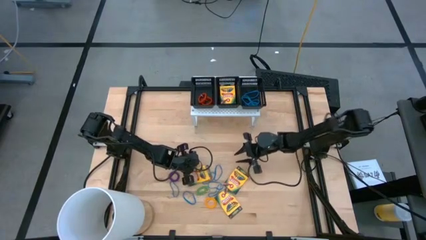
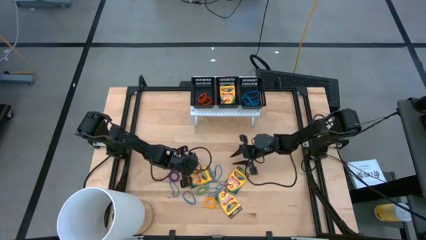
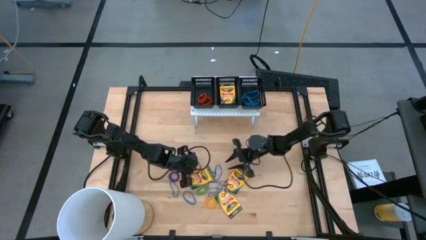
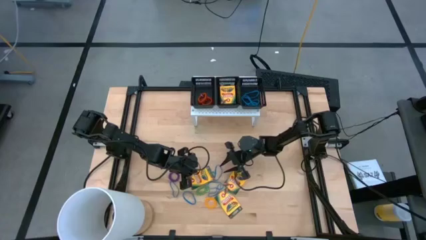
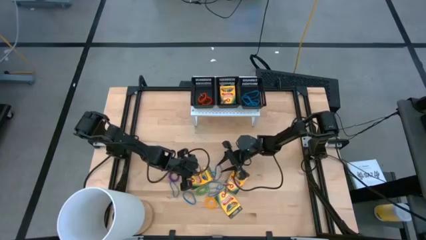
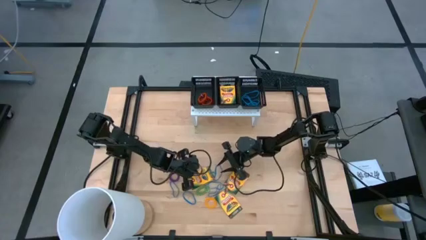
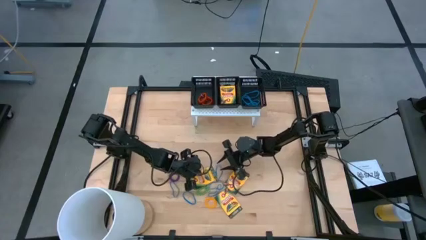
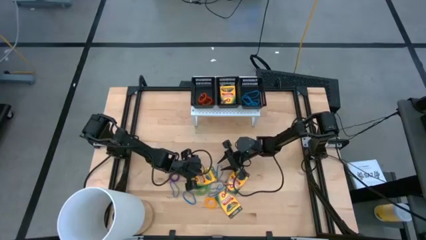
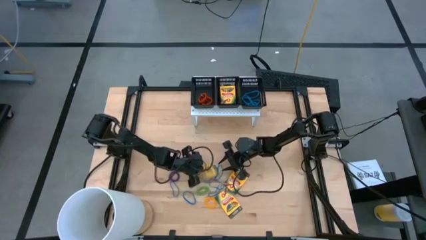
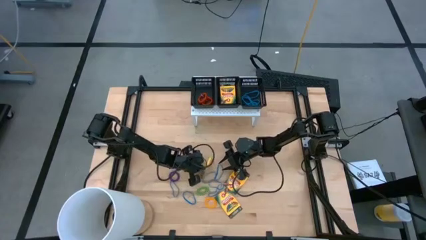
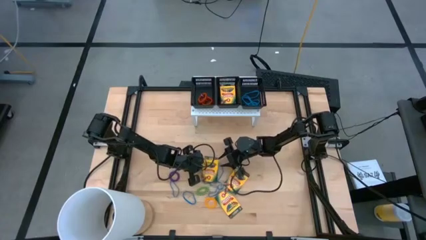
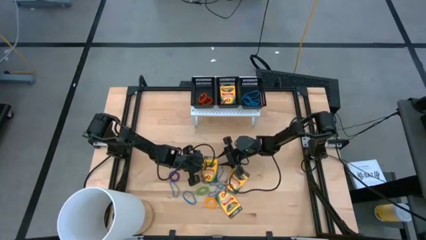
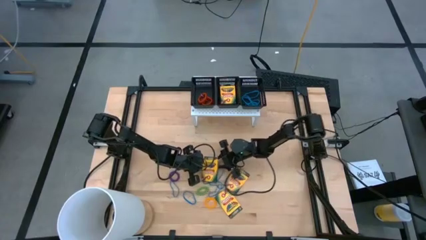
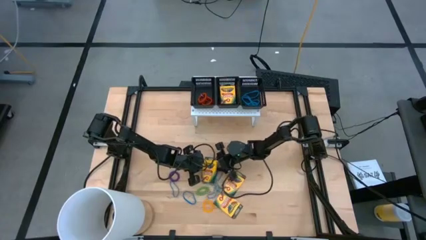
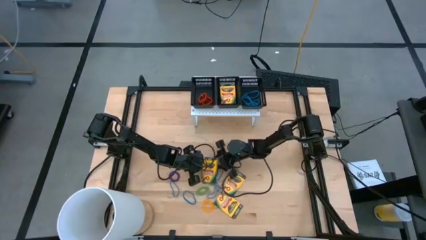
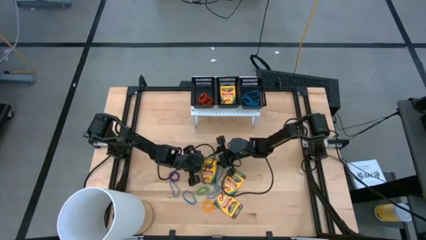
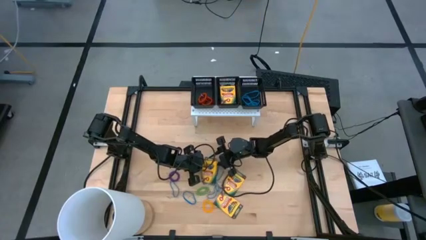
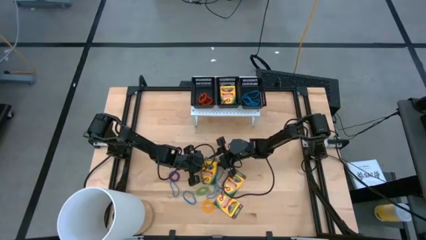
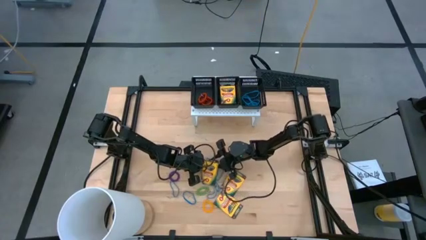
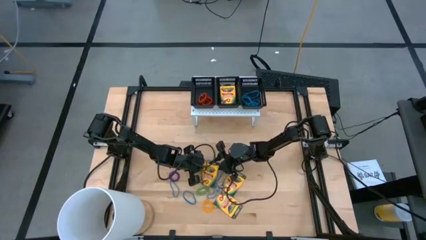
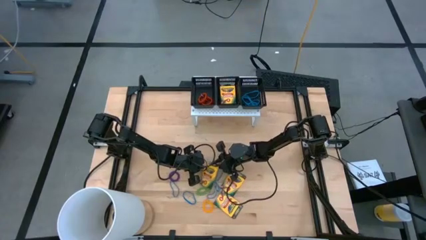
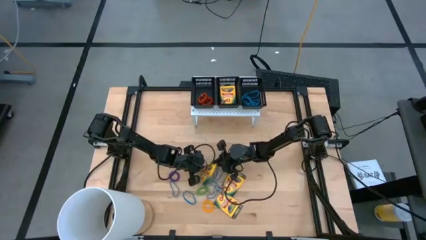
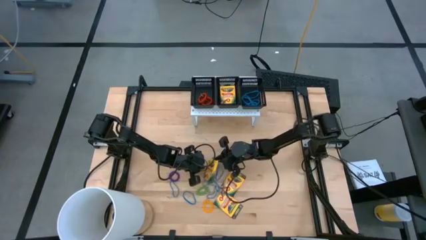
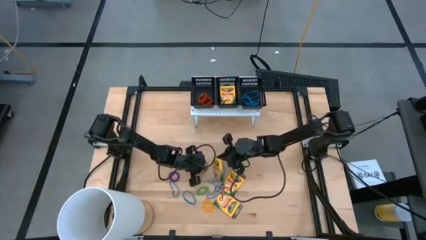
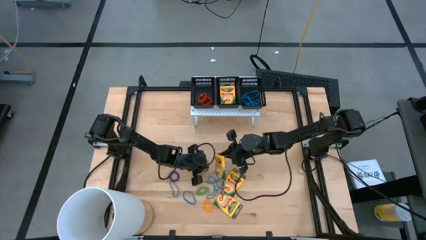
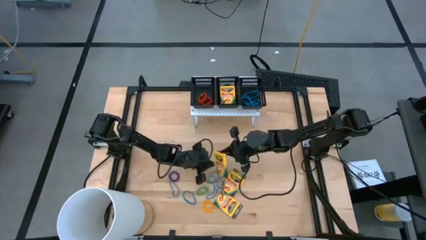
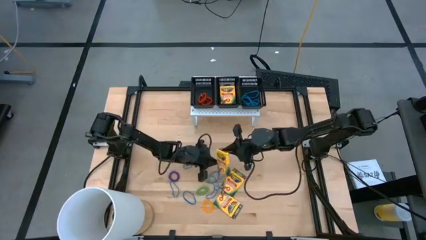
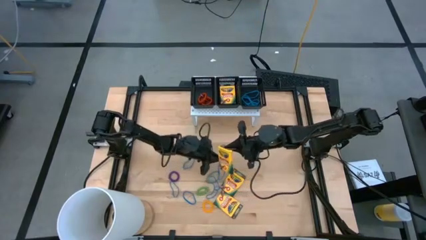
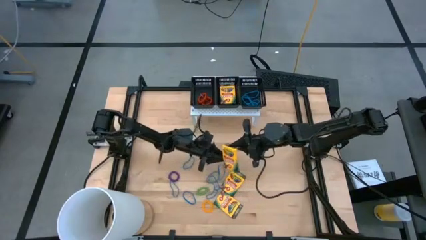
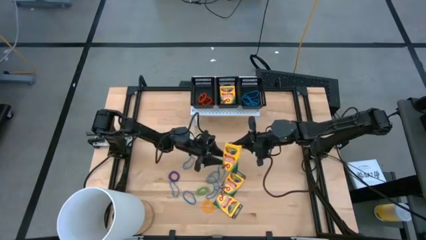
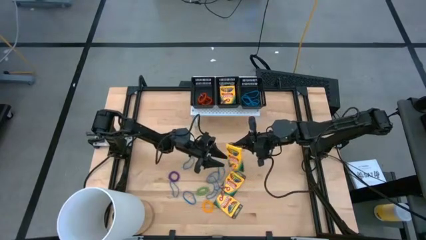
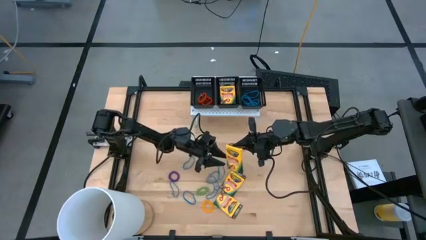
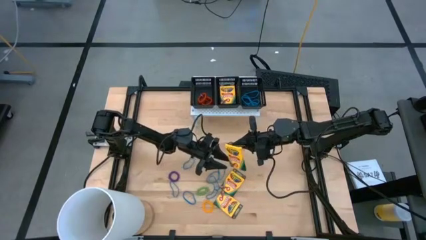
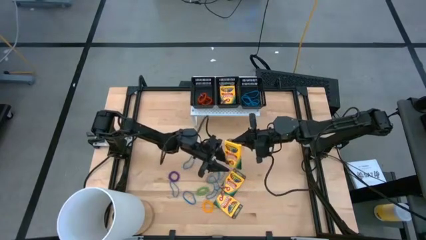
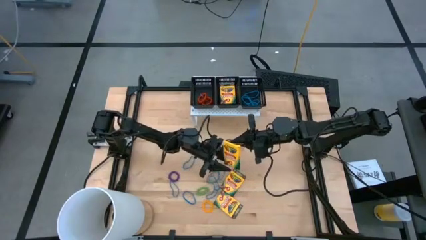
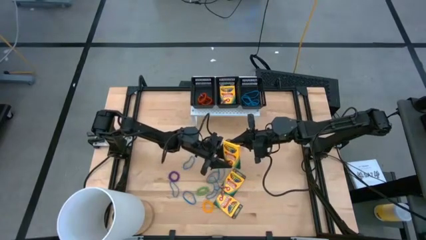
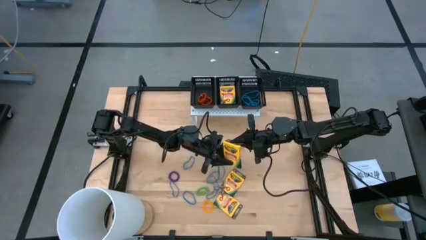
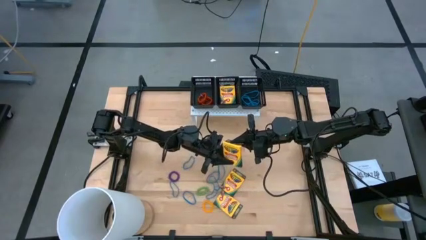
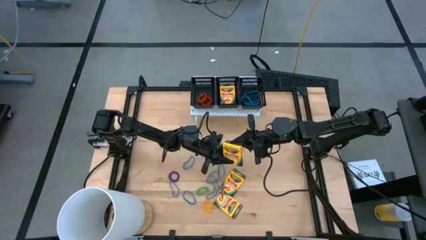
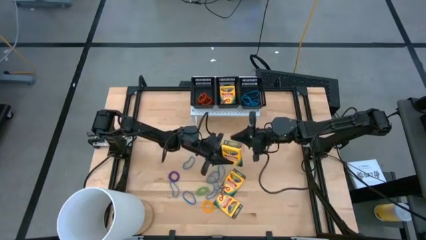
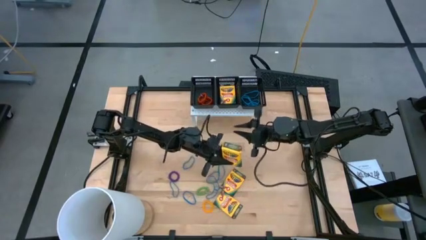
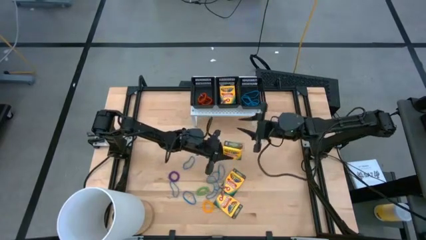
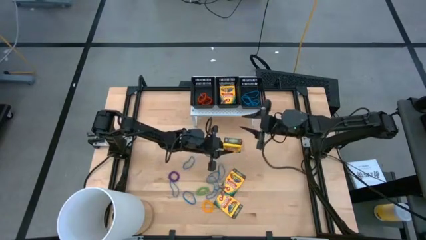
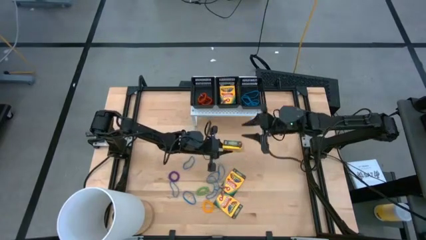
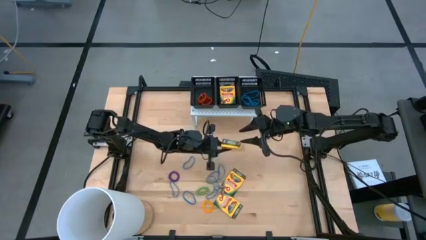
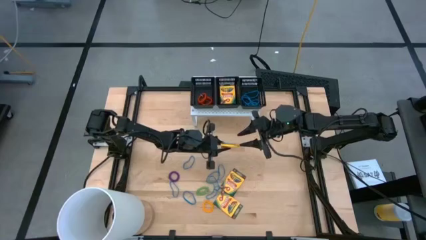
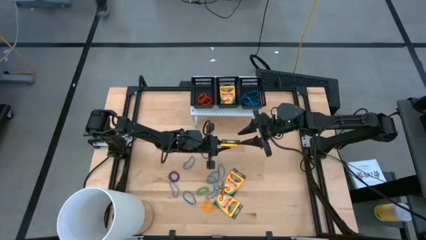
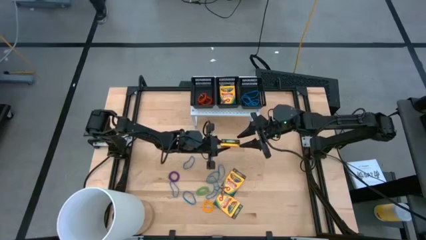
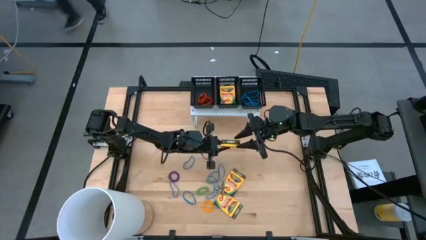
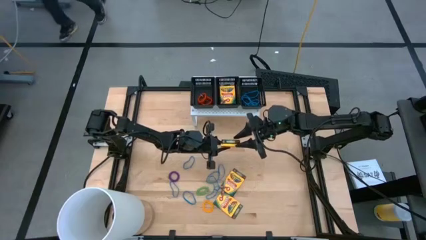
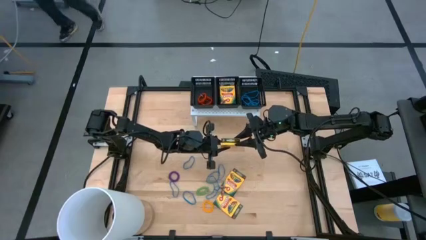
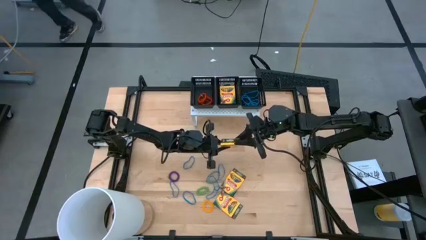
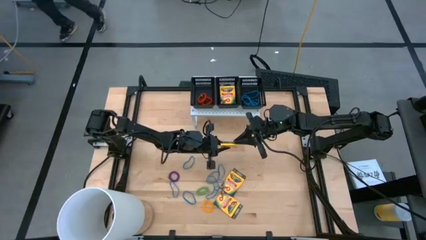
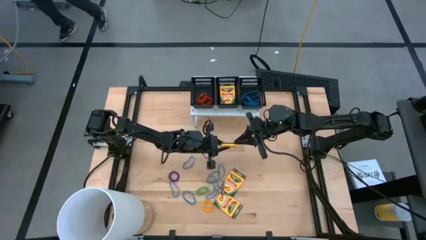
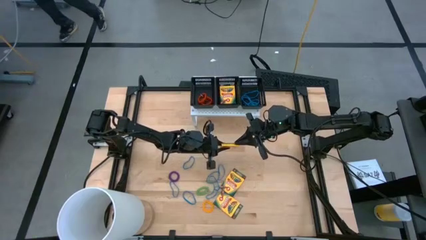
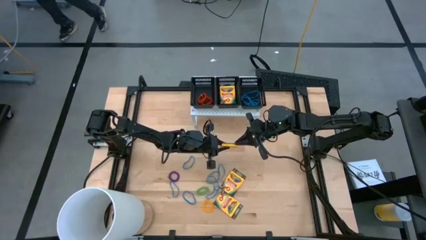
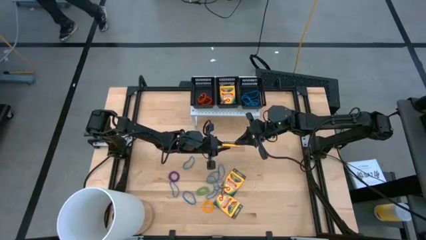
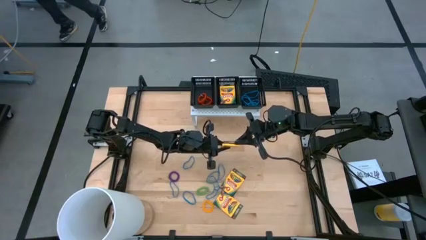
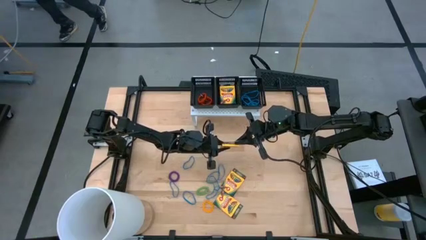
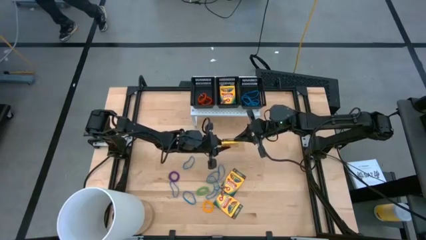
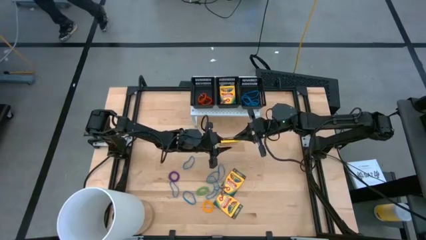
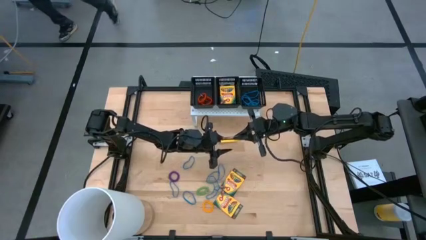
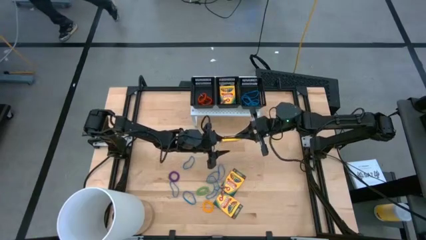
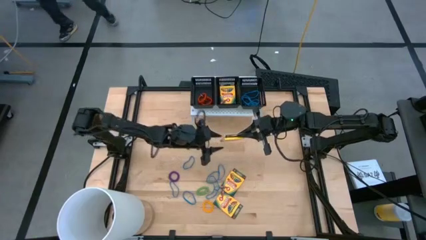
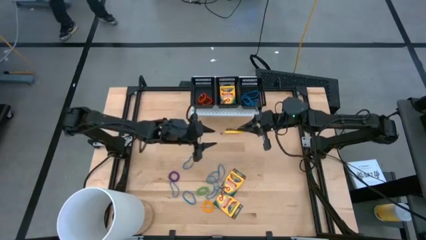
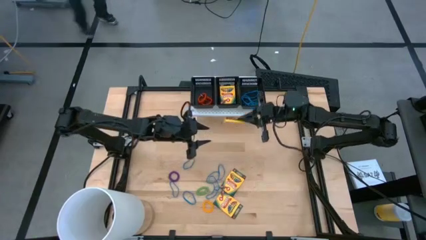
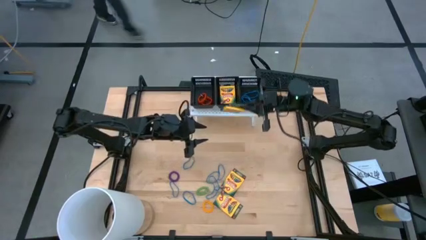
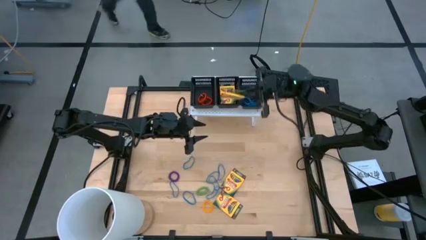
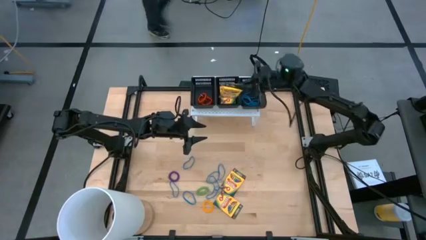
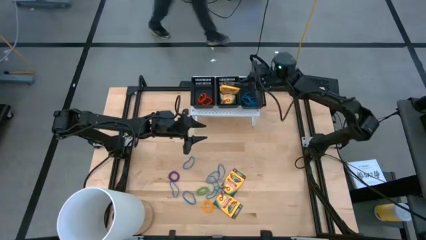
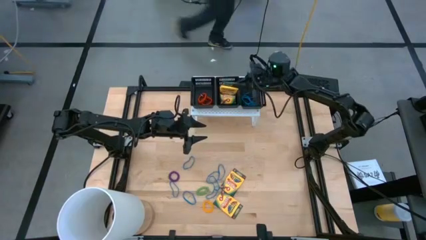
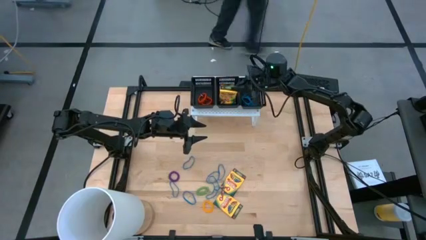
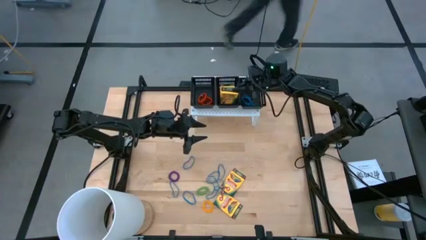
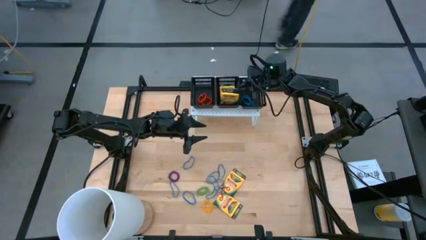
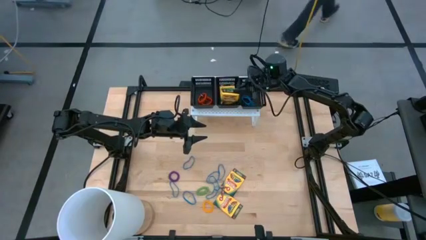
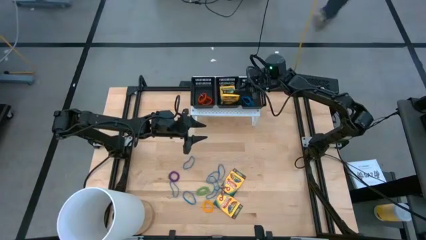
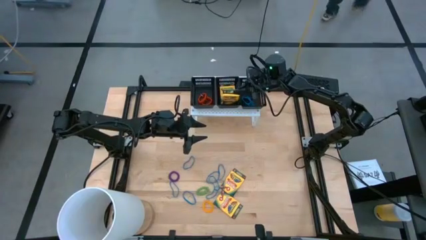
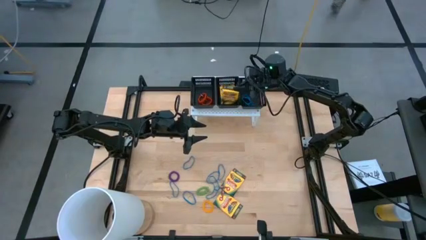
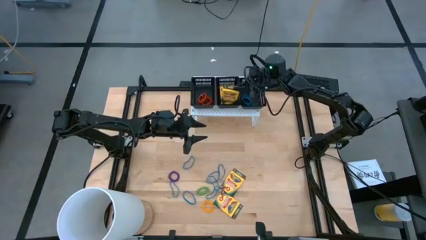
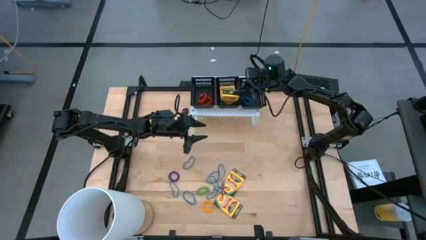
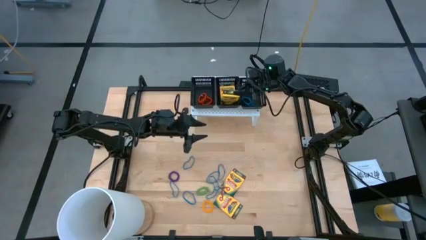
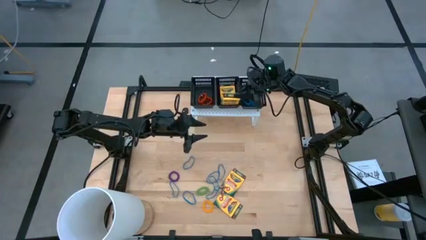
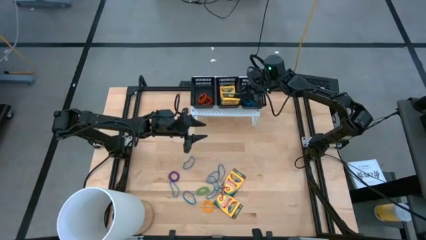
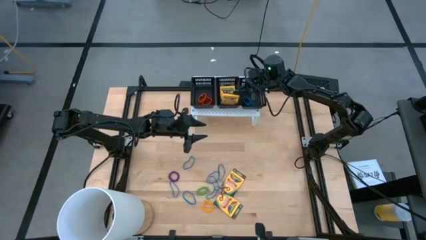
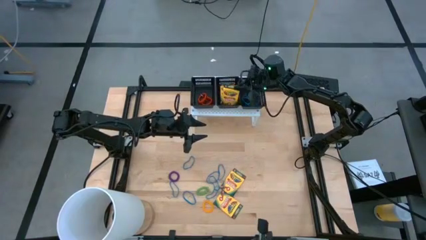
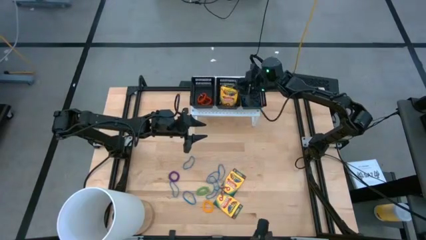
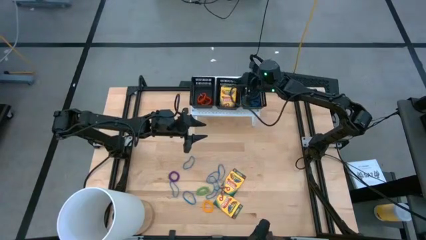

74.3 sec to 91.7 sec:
Task: Pick & Place Office Desk Supplies
Put the crayon box into the middle black bin on the shelf
